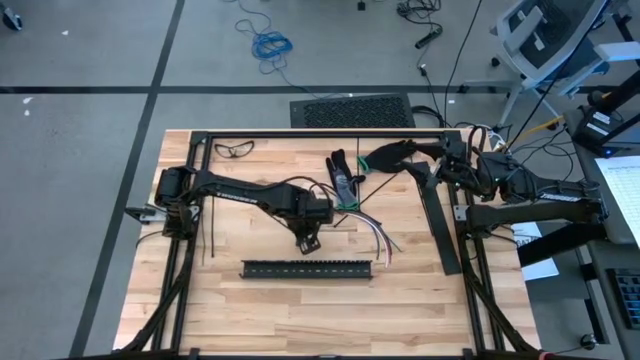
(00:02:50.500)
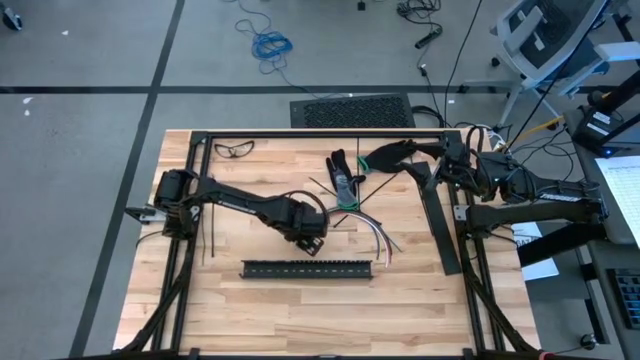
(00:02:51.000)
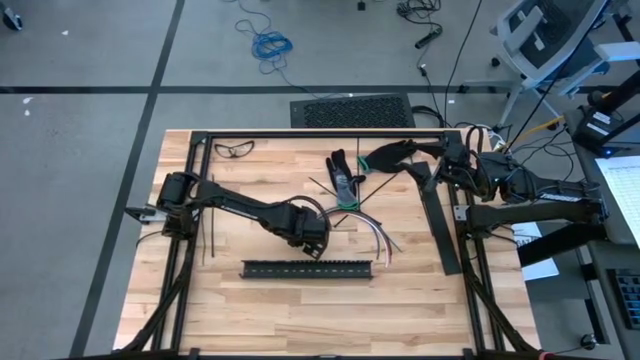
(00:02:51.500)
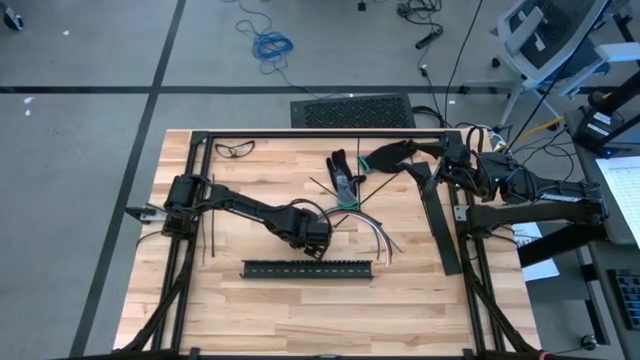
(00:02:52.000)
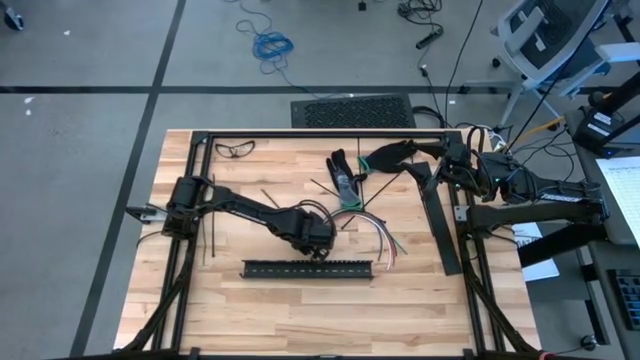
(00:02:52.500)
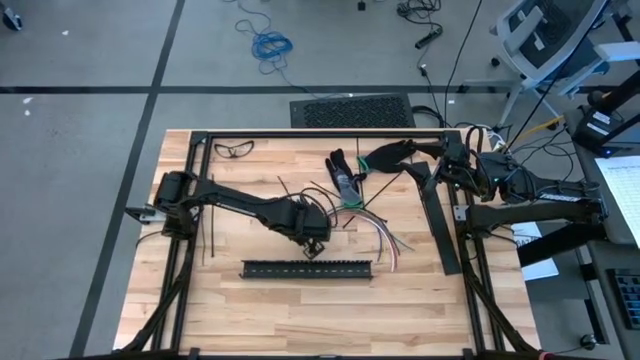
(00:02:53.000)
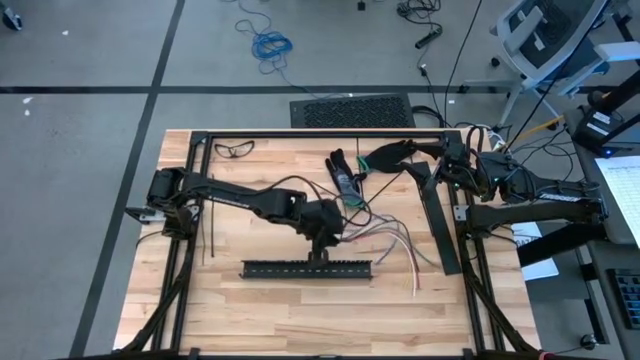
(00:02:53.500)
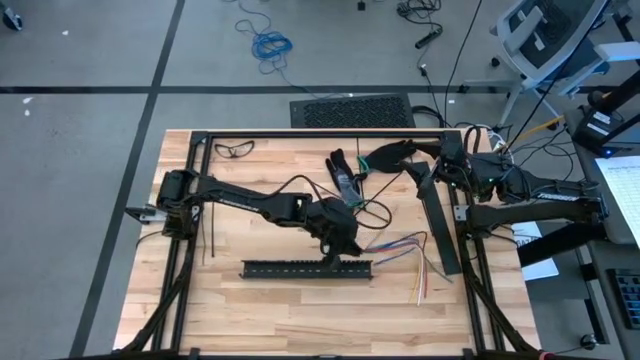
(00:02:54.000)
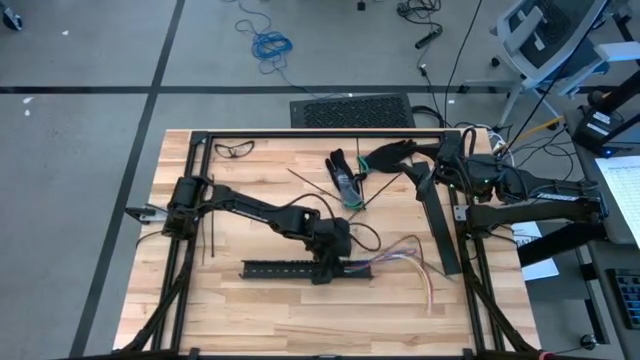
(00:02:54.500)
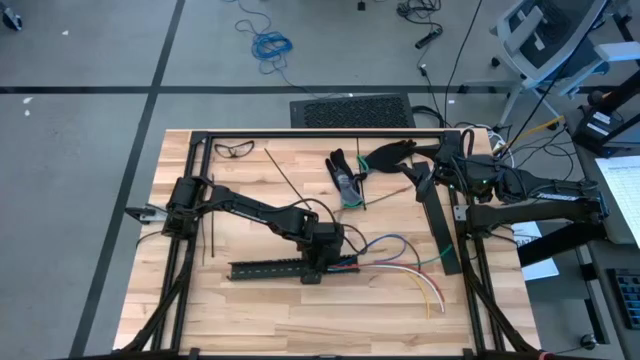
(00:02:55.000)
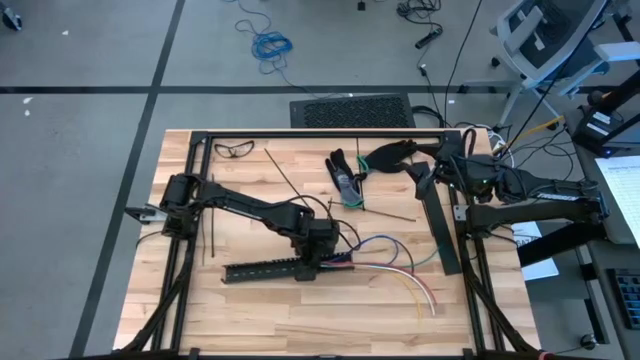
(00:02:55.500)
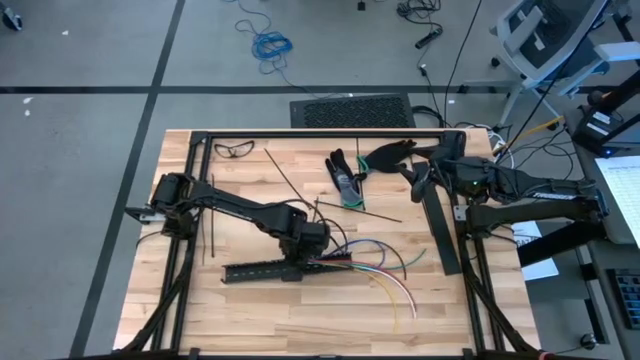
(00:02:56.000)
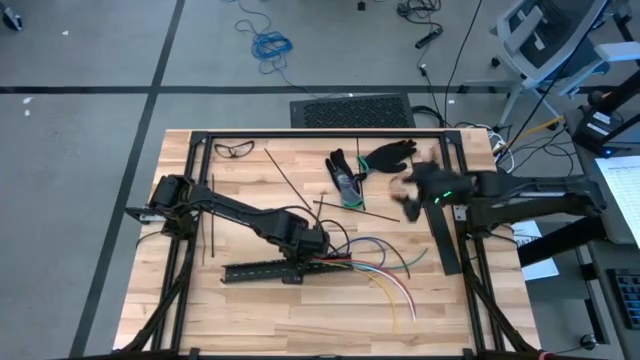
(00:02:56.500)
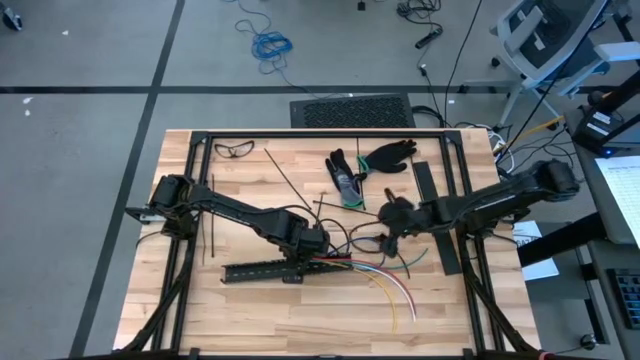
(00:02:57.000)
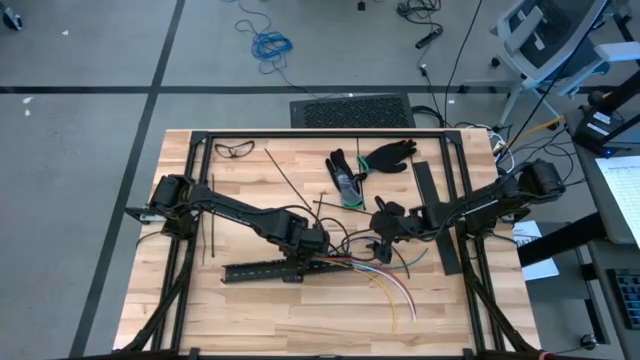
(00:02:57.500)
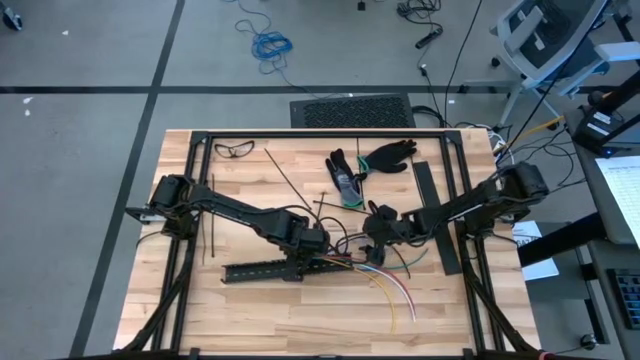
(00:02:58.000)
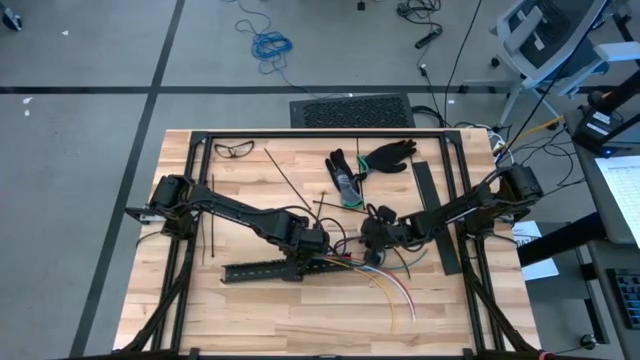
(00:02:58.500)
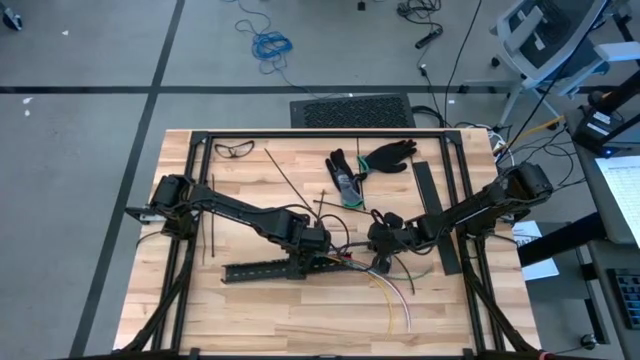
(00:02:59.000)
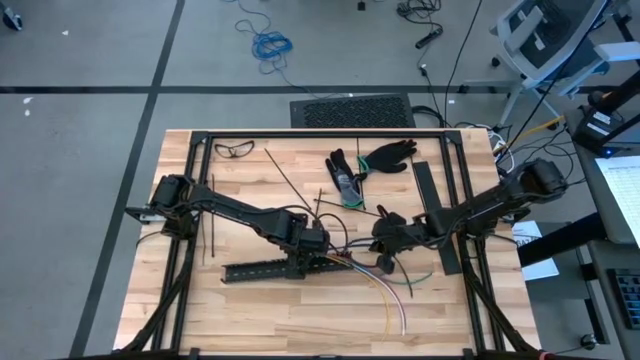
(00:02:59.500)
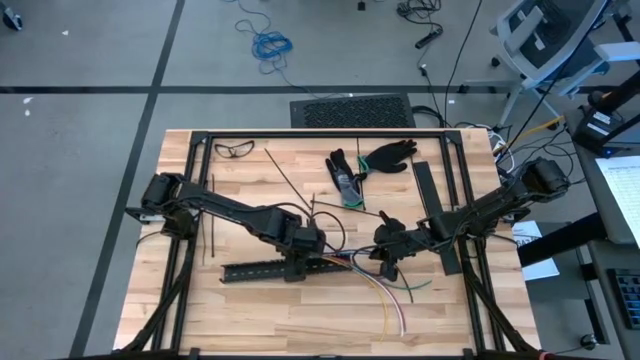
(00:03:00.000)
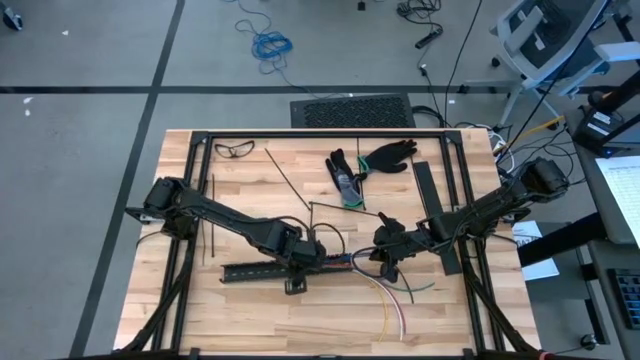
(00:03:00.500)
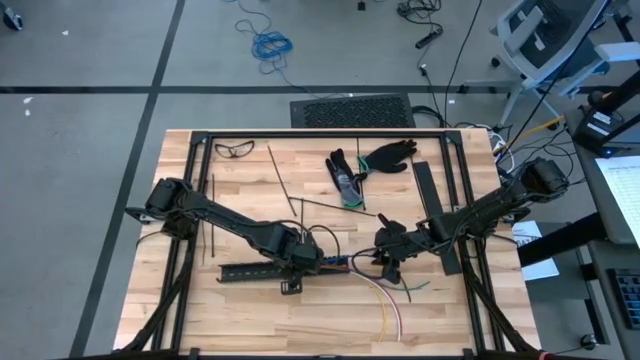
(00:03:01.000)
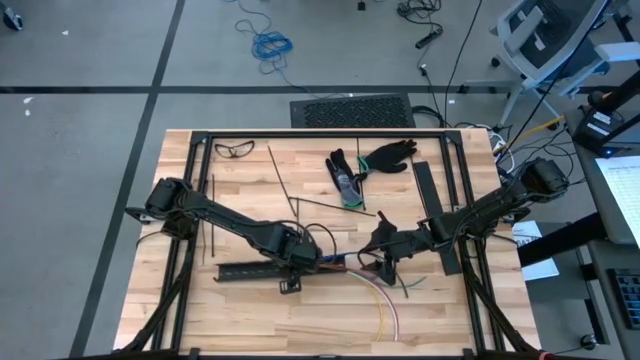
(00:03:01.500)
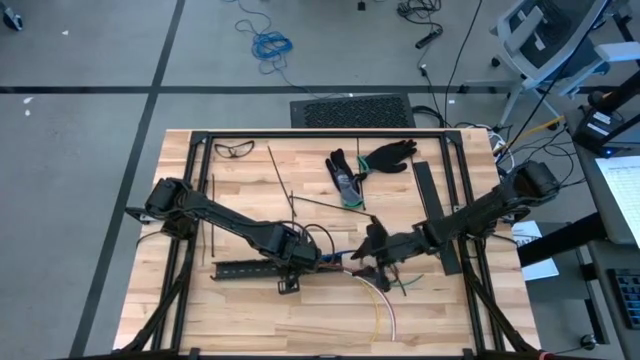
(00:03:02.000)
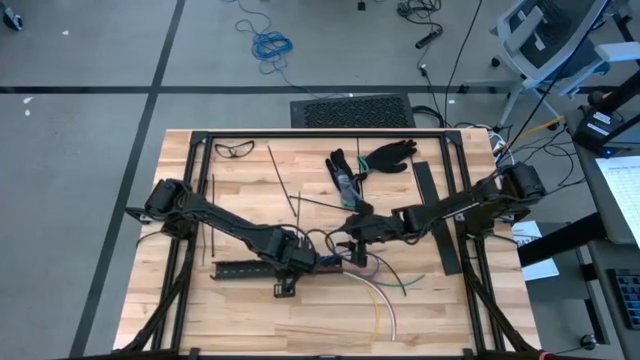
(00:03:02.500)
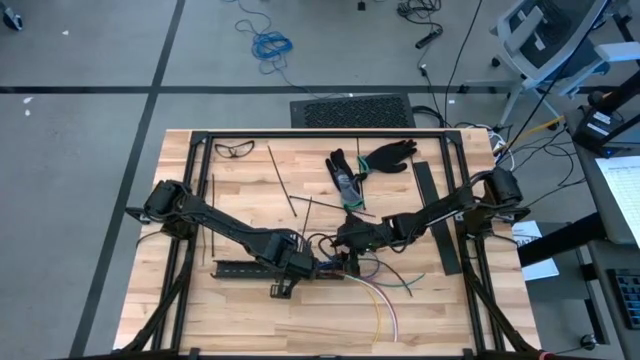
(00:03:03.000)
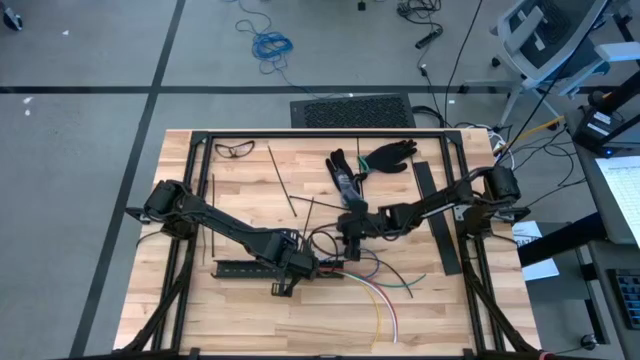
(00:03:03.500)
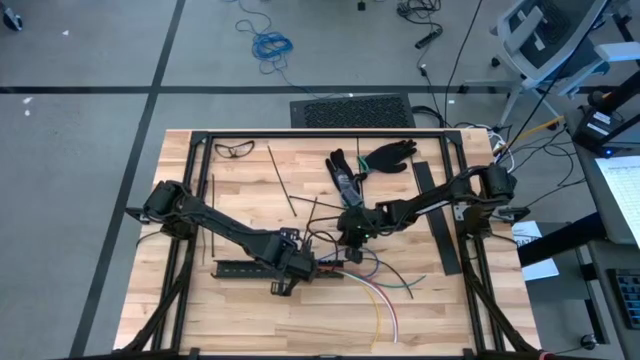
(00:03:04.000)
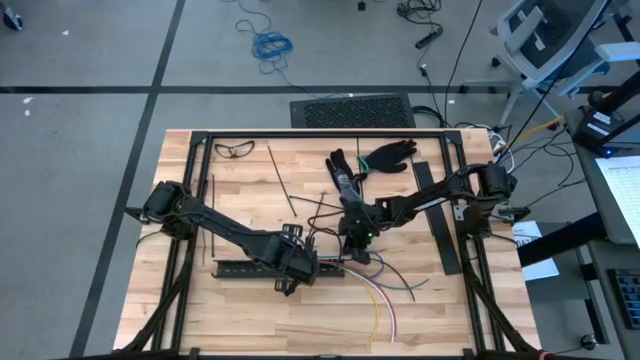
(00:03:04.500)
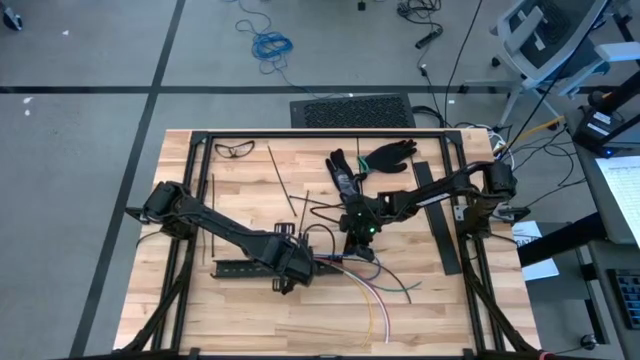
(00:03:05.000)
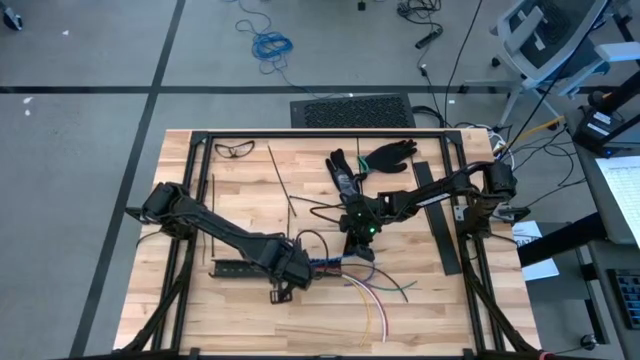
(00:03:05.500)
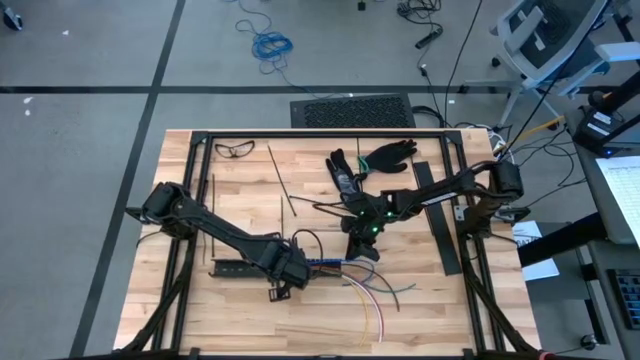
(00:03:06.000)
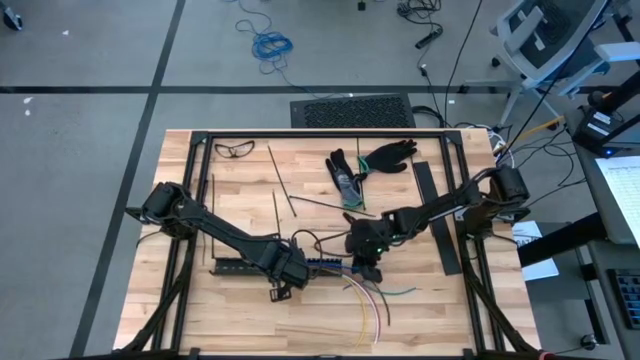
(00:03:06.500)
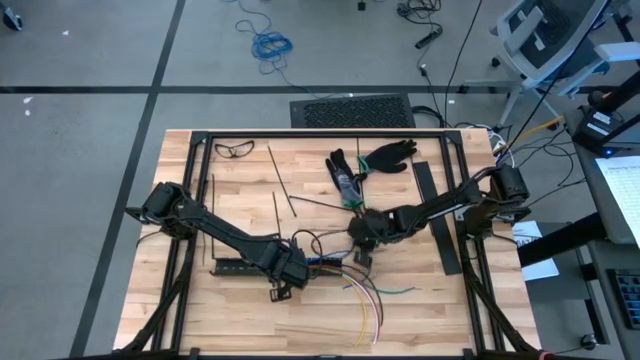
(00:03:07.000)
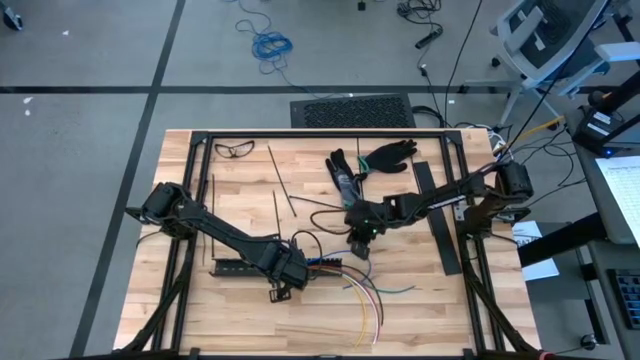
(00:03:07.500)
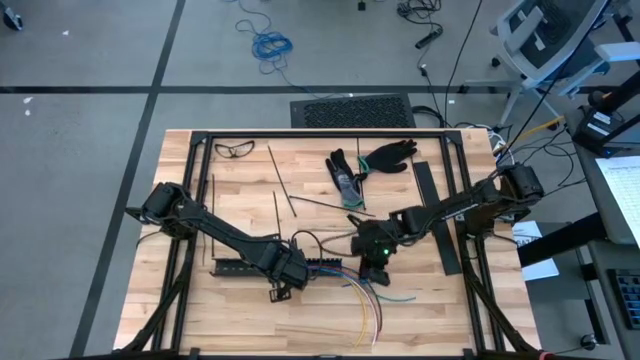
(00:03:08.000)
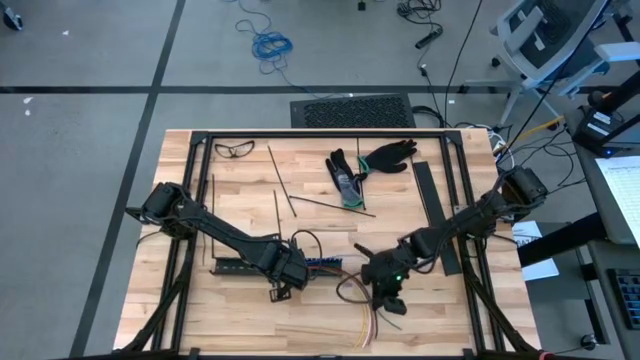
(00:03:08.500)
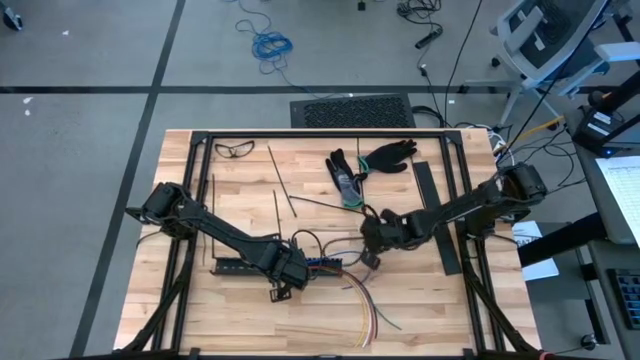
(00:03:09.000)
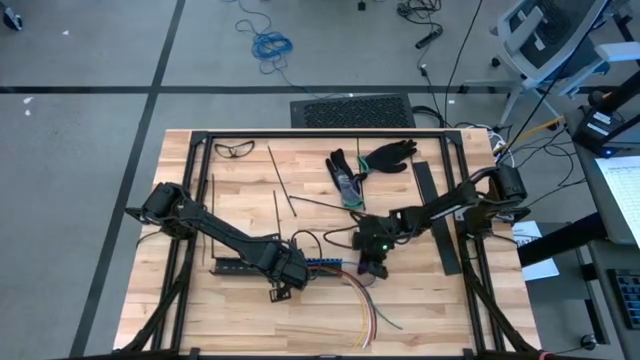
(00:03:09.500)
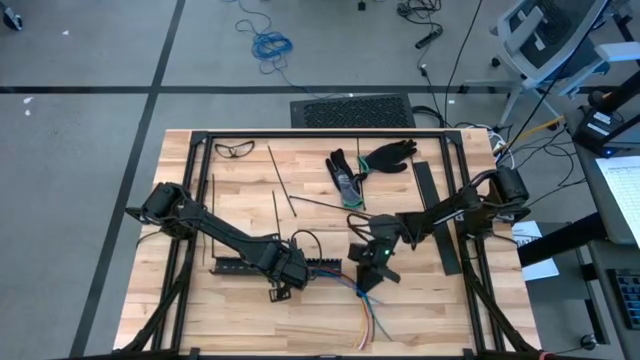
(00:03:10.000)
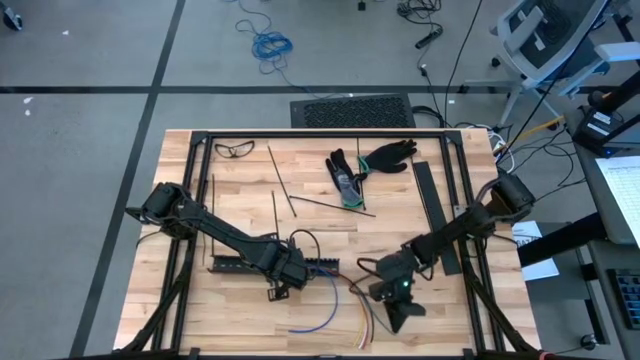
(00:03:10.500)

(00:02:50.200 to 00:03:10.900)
Task: Ziptie cables
Put the zip tied cable wires into the black cable duct
